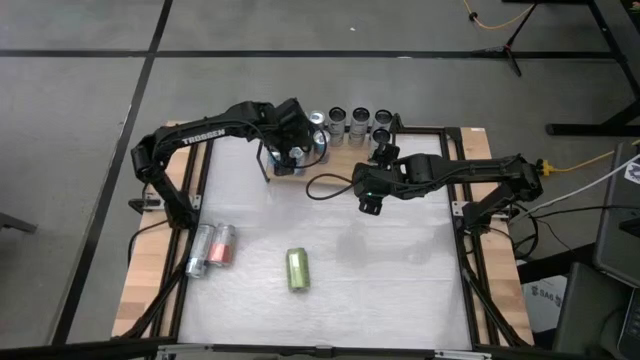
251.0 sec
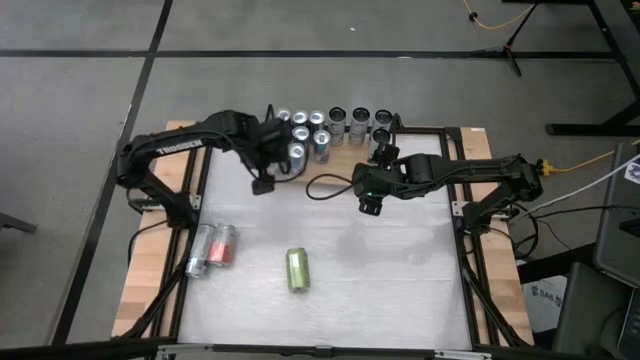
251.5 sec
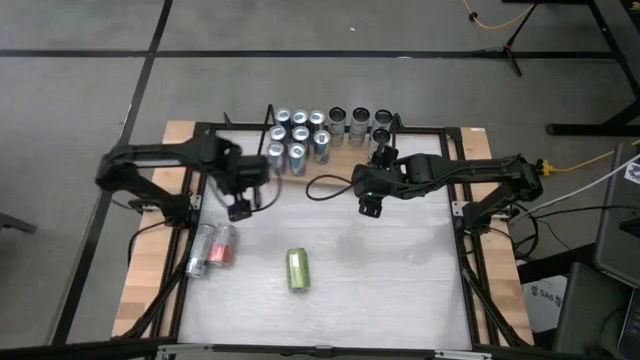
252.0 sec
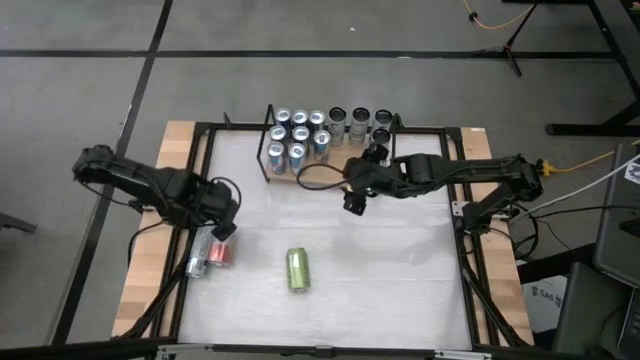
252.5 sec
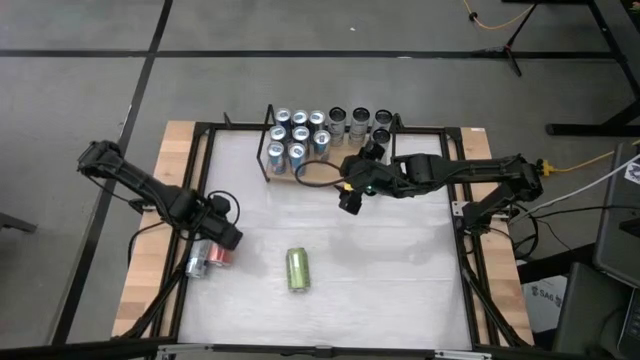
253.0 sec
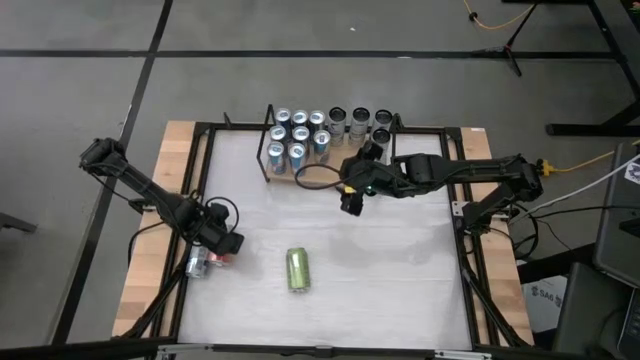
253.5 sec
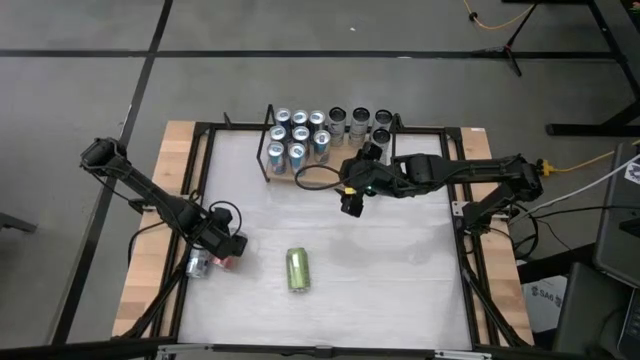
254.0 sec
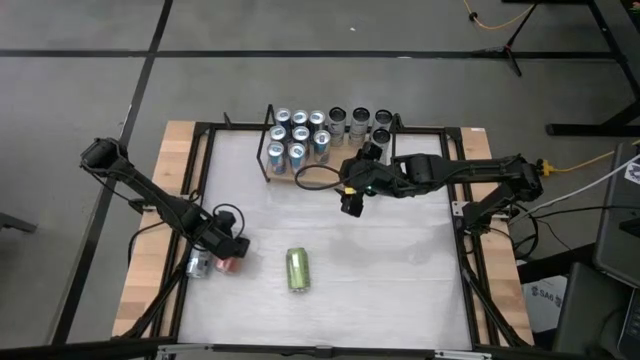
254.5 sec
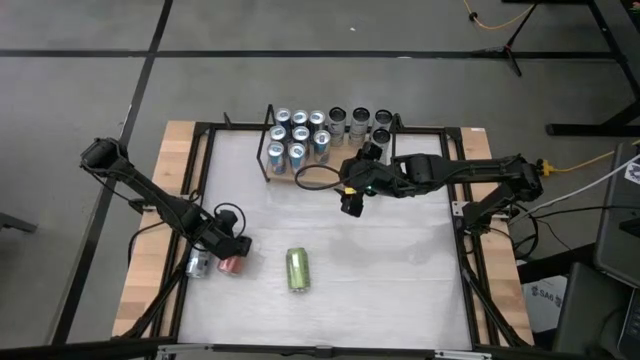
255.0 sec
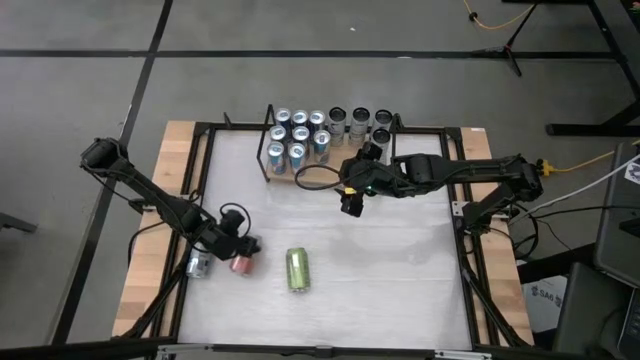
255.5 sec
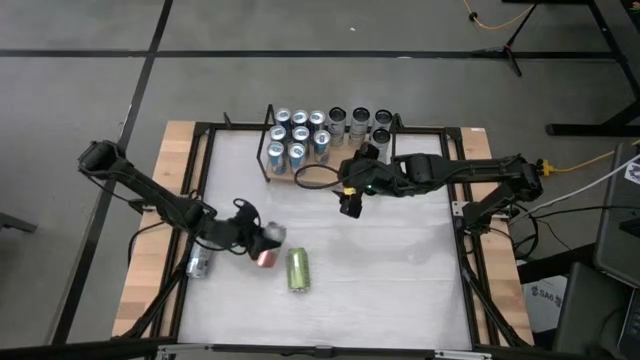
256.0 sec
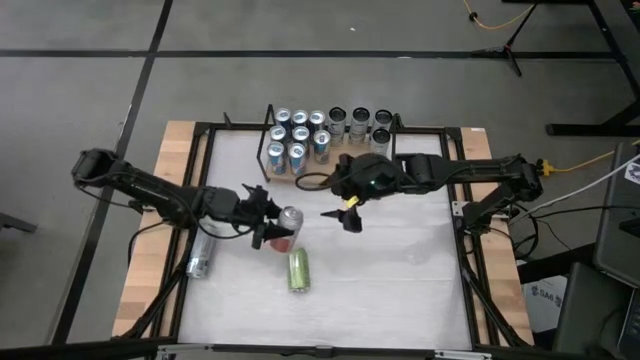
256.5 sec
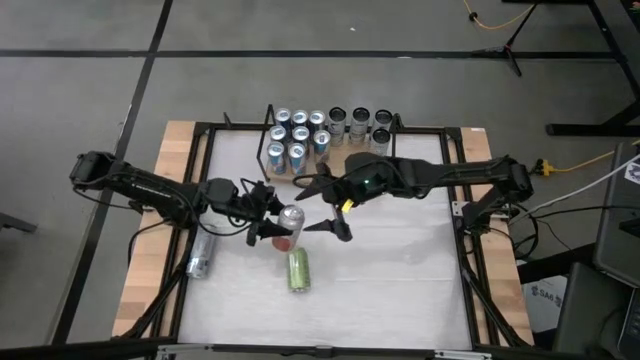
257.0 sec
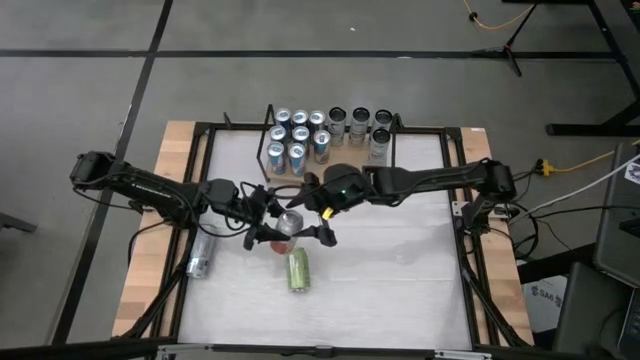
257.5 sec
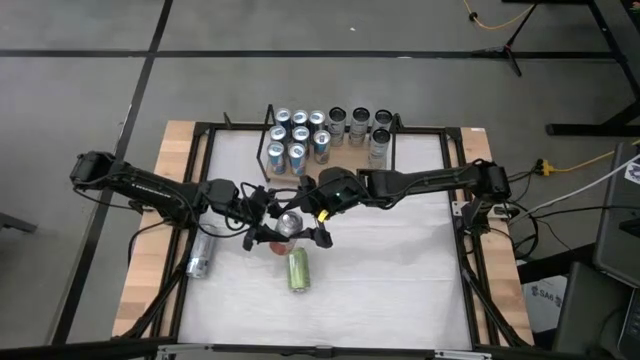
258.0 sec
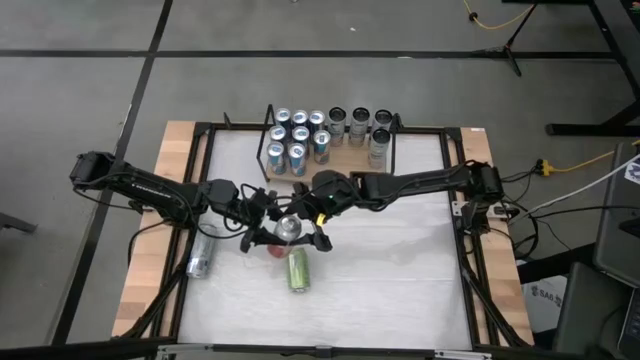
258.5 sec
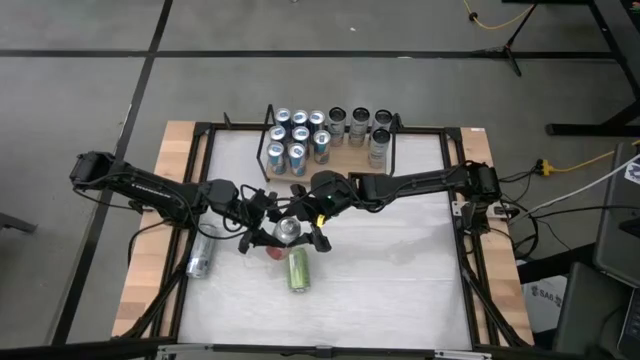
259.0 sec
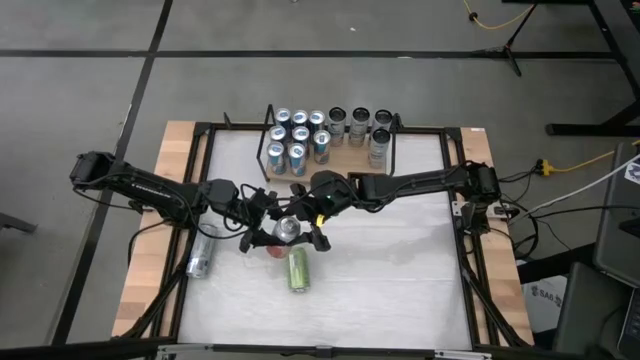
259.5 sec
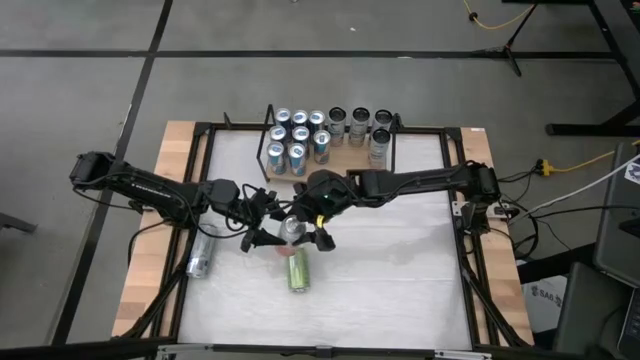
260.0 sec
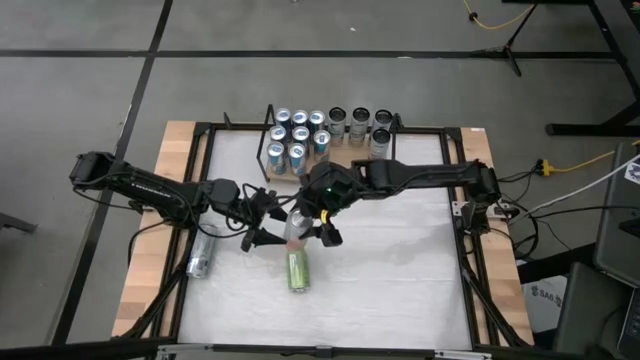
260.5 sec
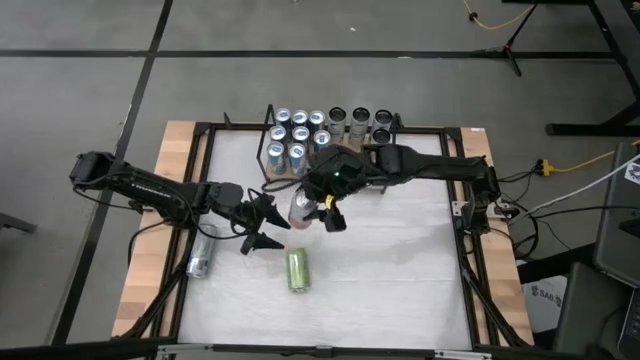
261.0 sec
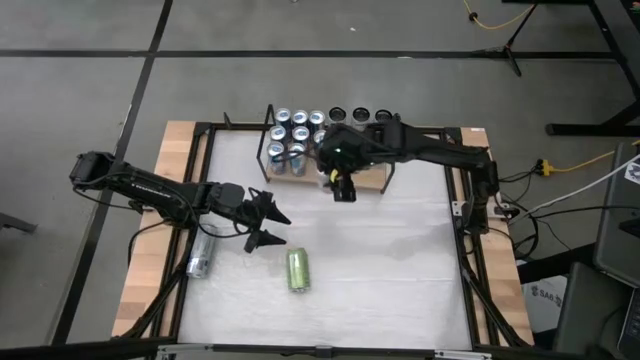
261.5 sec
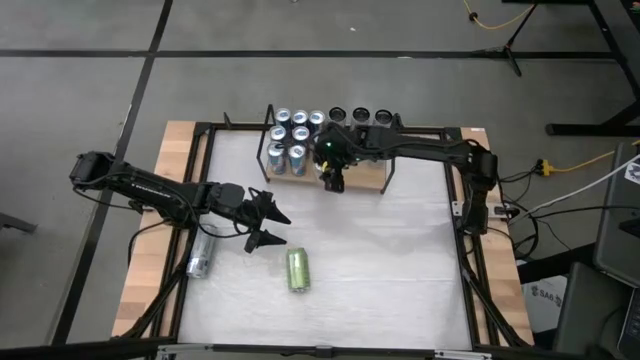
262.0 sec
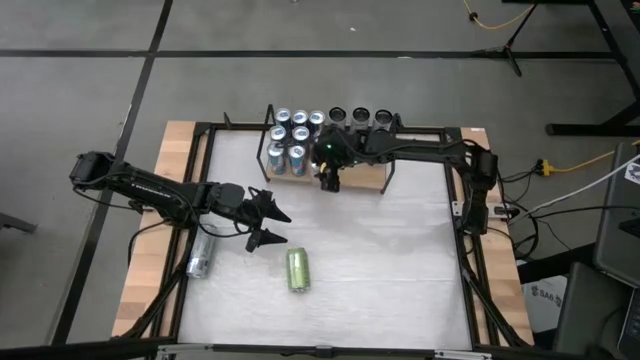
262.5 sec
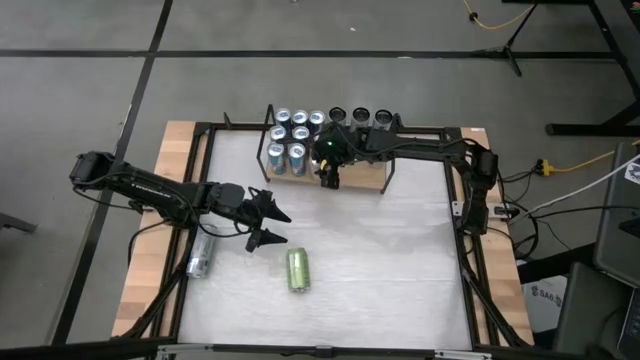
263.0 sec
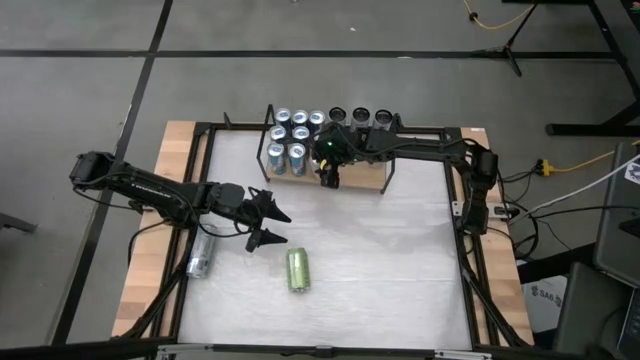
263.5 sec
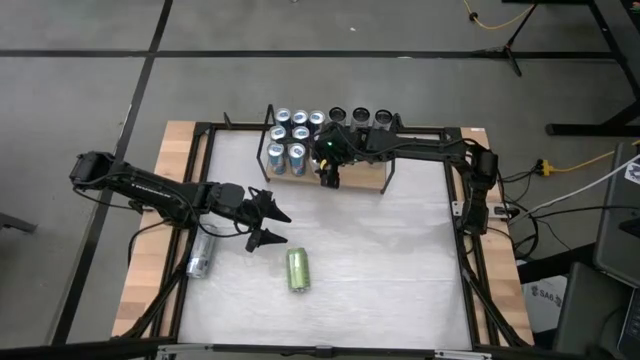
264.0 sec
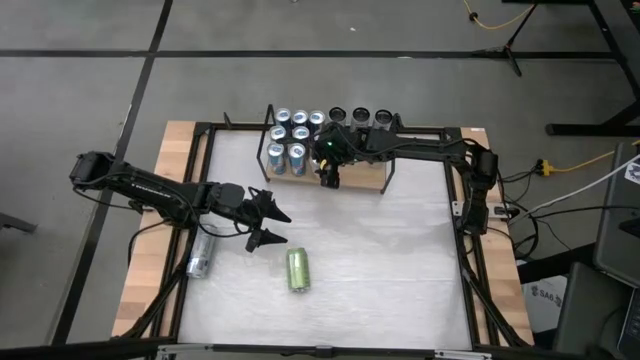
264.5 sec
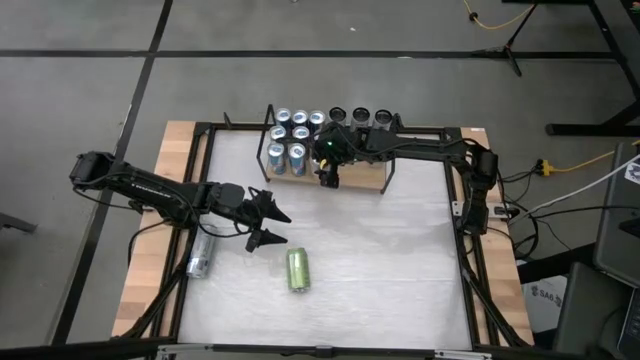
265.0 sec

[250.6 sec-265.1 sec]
Task: Place canned beverage on shelf
Put the white pink soda can on the shelf

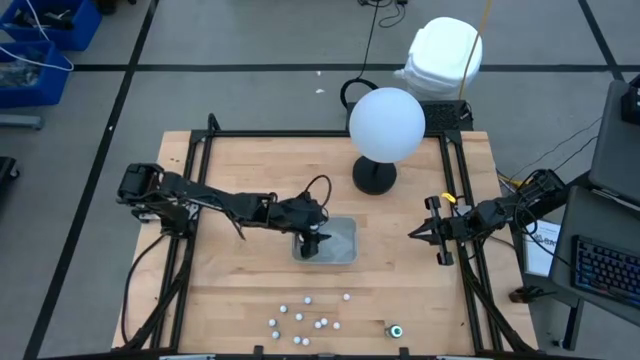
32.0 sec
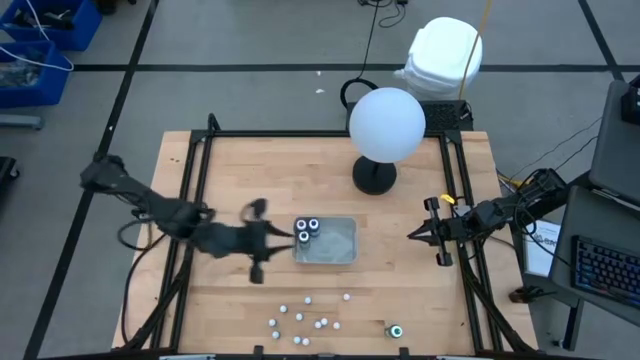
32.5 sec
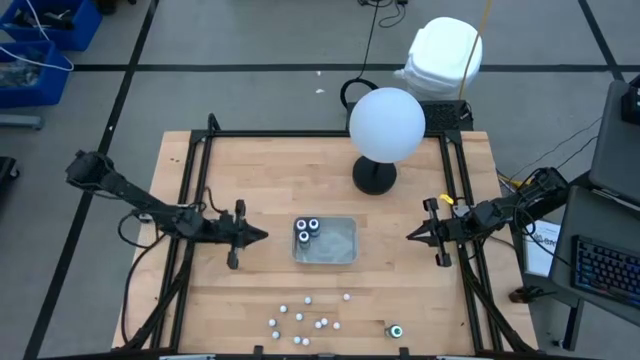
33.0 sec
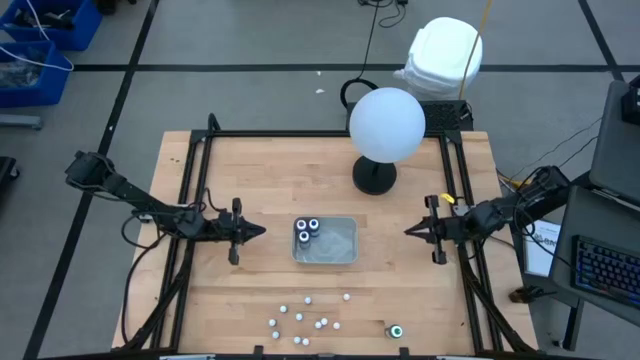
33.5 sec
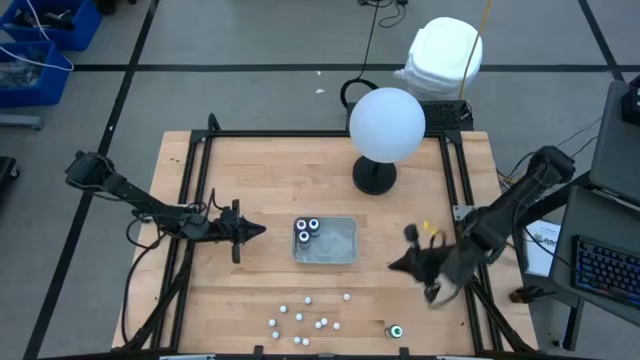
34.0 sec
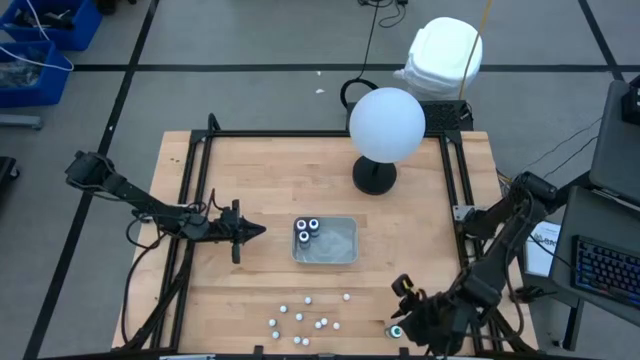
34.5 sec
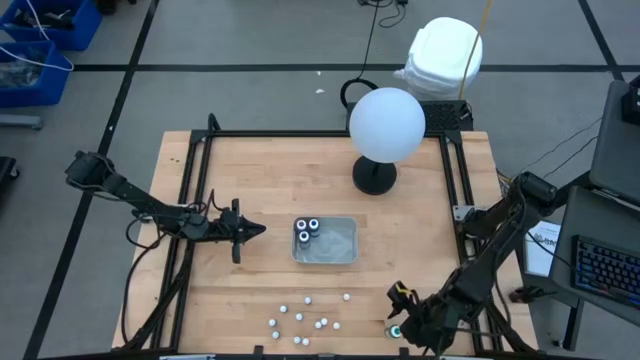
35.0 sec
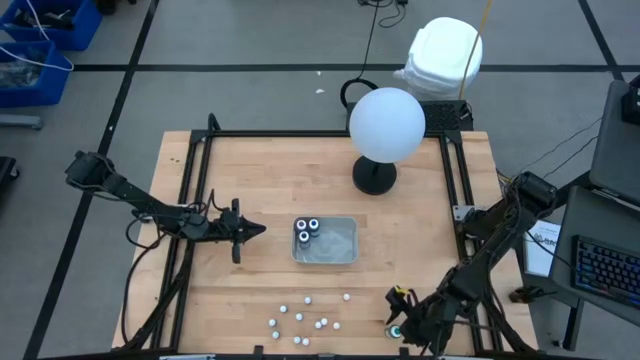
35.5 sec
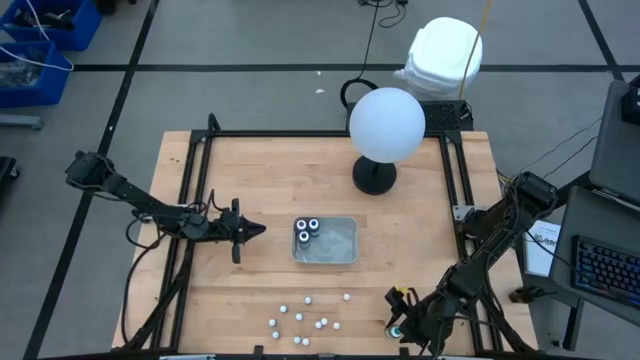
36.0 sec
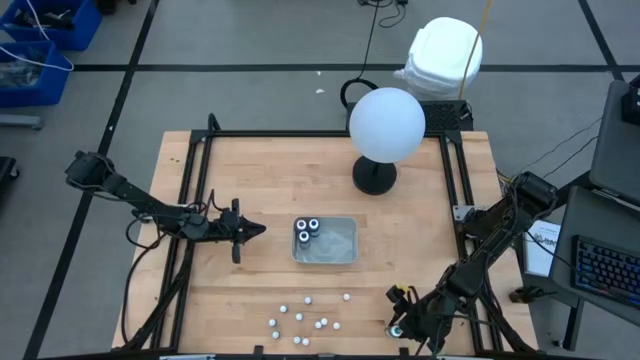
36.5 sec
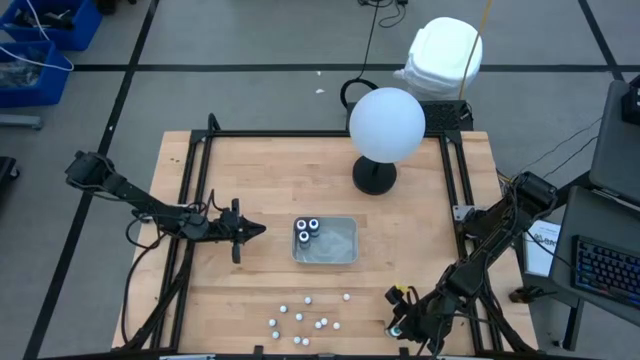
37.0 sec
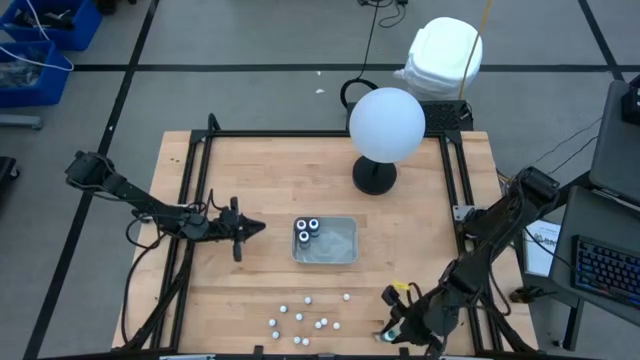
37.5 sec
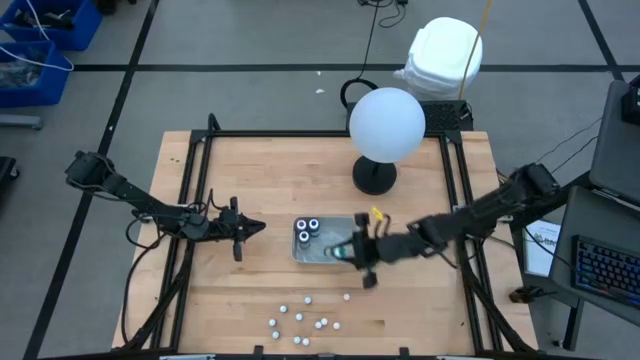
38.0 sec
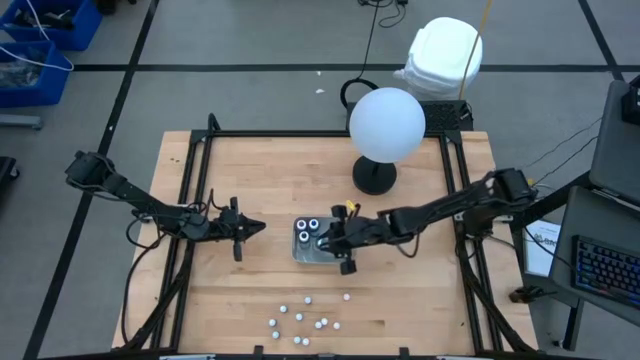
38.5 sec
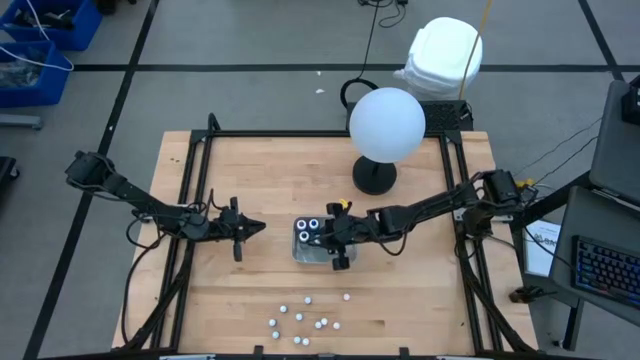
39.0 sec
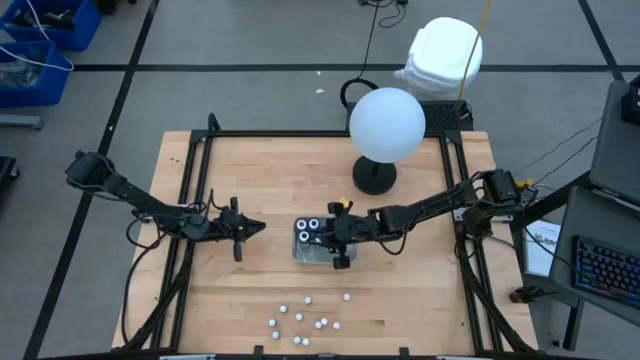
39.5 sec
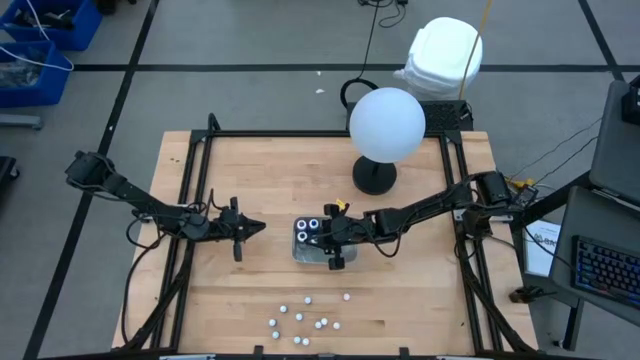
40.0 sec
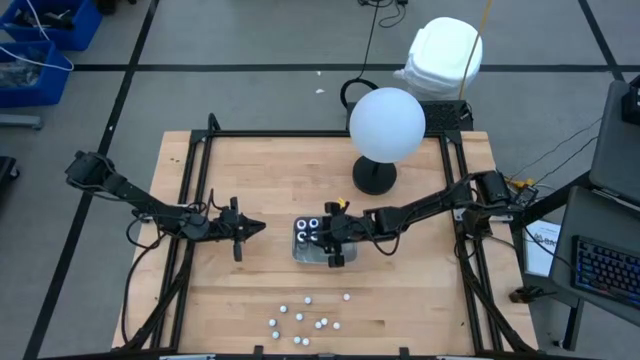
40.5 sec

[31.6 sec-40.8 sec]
Task: Pick & Place food coloring
Put the large green food coloring bottle into the gray bin
